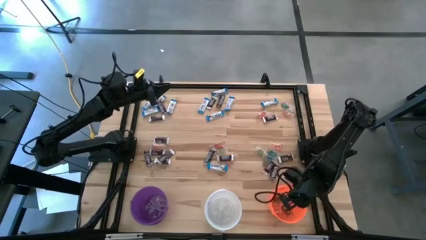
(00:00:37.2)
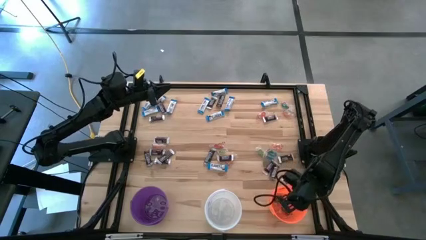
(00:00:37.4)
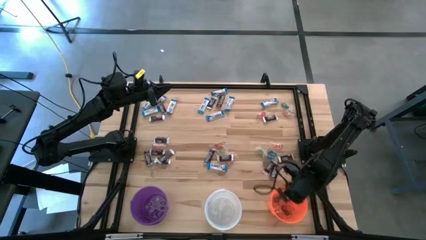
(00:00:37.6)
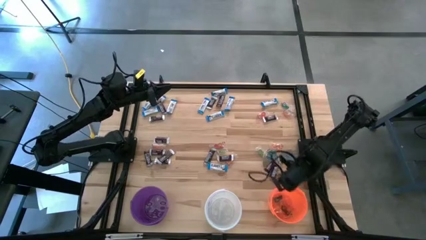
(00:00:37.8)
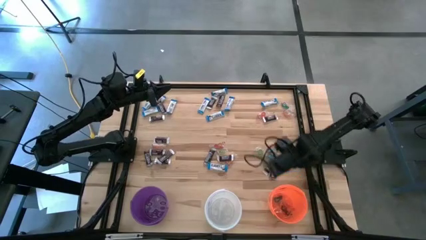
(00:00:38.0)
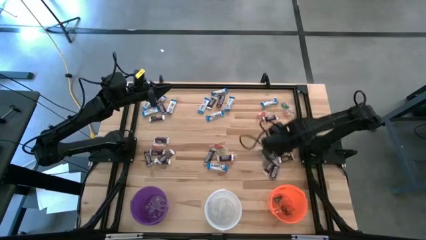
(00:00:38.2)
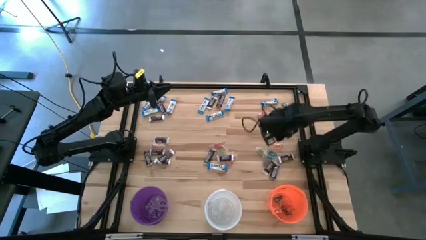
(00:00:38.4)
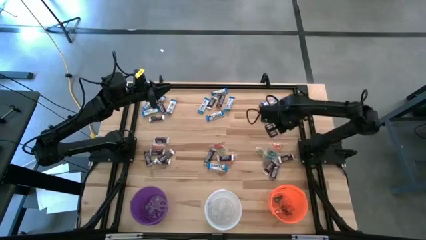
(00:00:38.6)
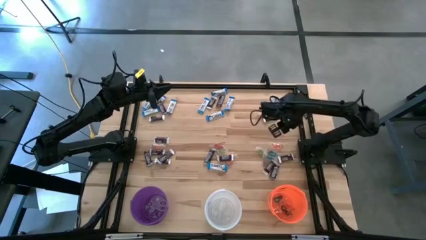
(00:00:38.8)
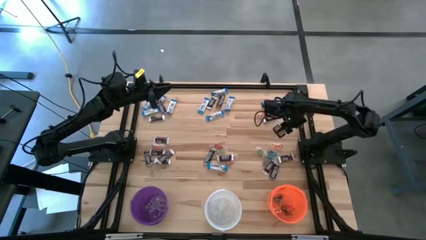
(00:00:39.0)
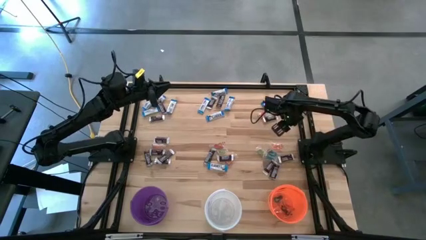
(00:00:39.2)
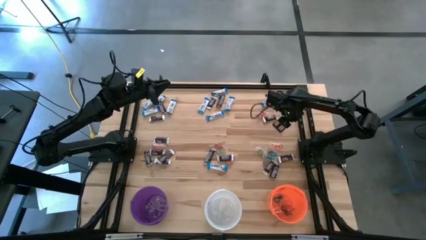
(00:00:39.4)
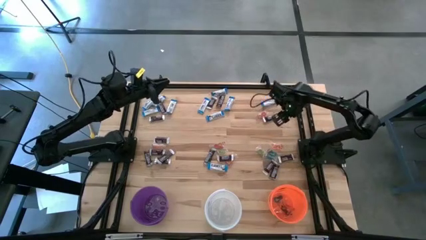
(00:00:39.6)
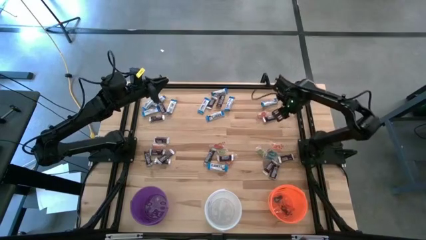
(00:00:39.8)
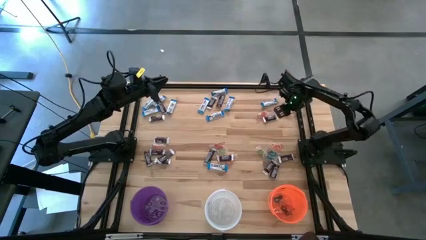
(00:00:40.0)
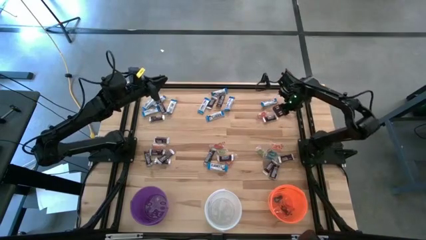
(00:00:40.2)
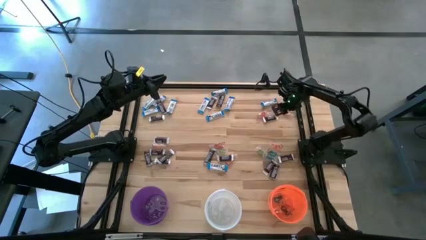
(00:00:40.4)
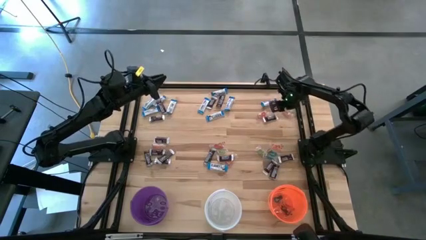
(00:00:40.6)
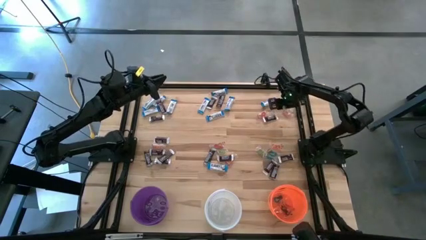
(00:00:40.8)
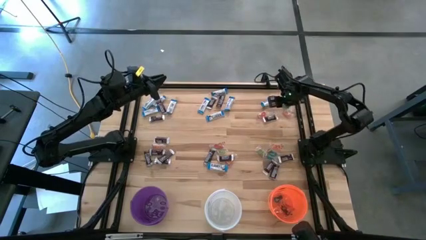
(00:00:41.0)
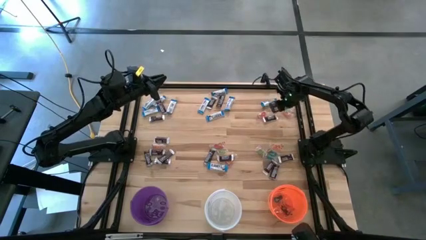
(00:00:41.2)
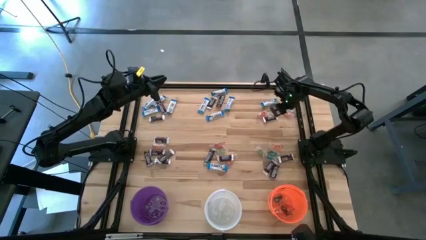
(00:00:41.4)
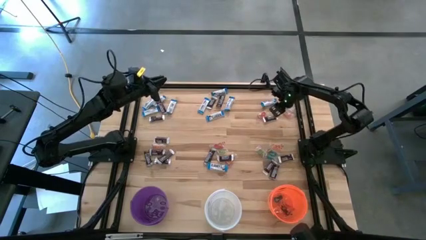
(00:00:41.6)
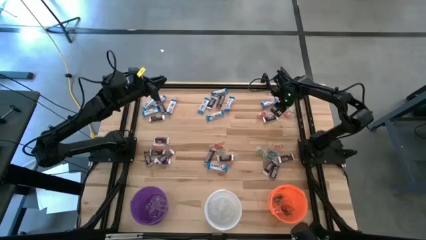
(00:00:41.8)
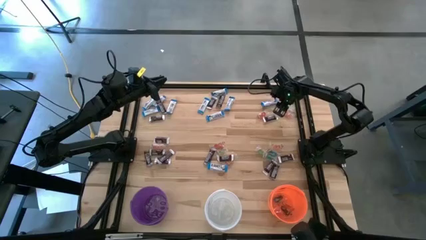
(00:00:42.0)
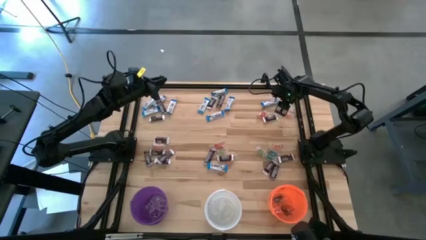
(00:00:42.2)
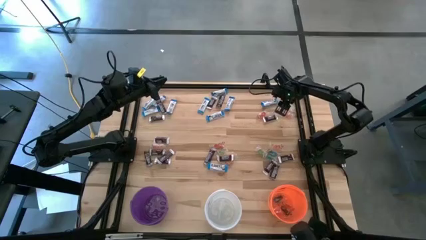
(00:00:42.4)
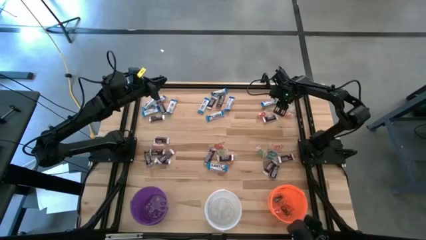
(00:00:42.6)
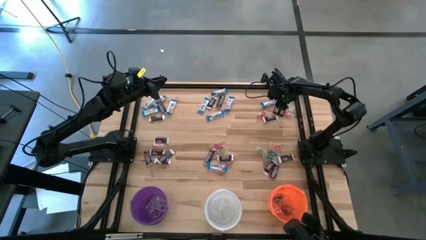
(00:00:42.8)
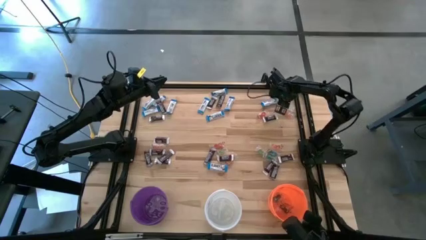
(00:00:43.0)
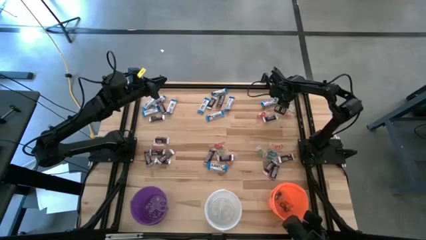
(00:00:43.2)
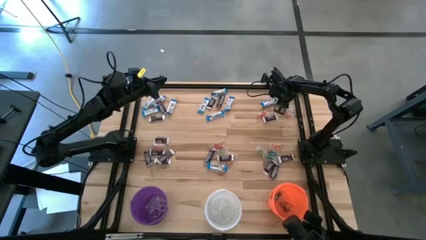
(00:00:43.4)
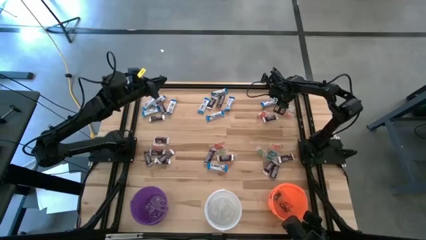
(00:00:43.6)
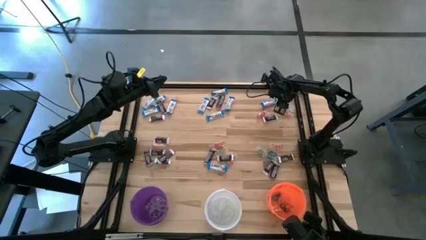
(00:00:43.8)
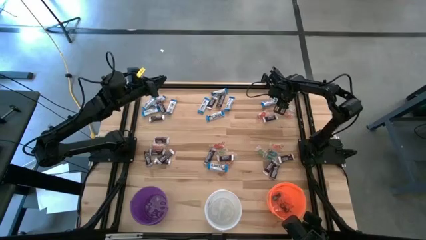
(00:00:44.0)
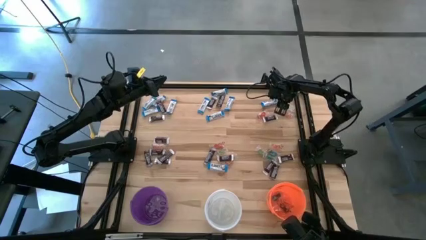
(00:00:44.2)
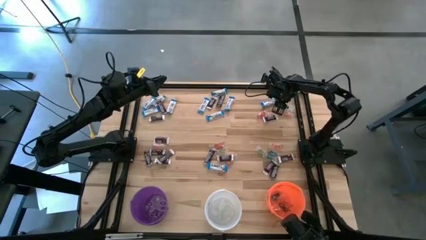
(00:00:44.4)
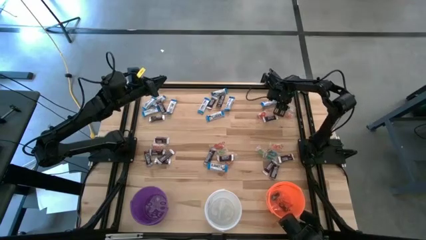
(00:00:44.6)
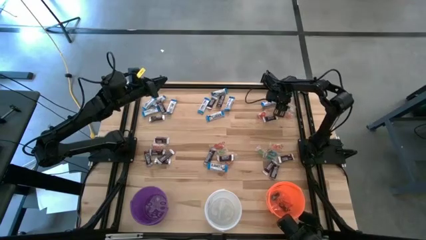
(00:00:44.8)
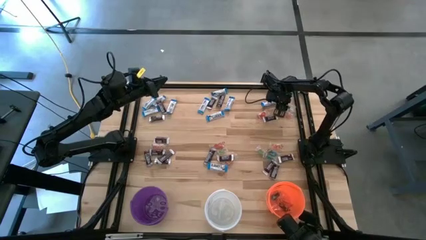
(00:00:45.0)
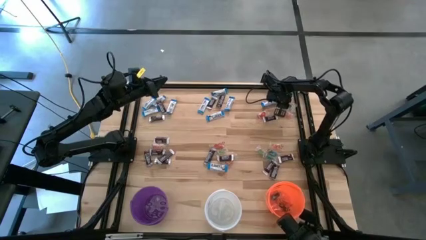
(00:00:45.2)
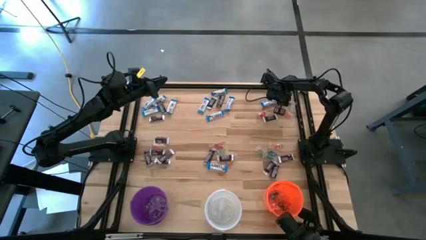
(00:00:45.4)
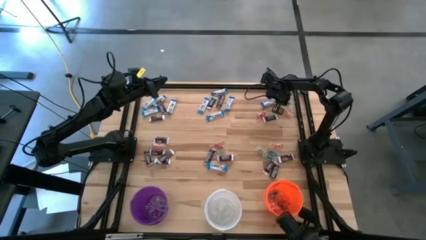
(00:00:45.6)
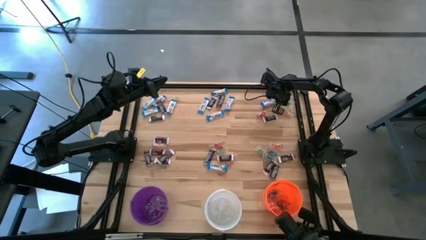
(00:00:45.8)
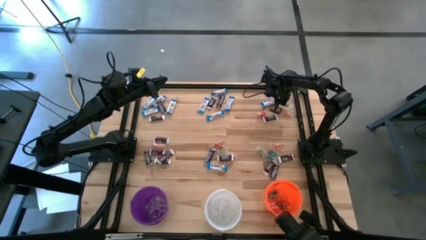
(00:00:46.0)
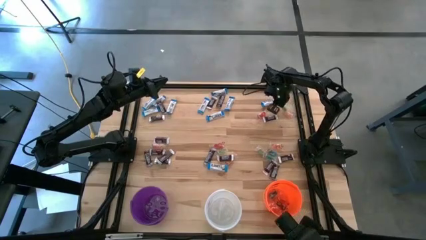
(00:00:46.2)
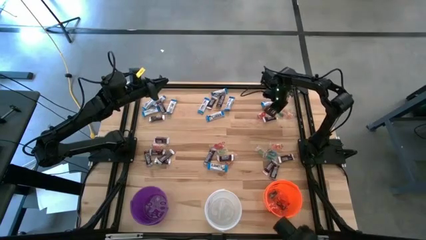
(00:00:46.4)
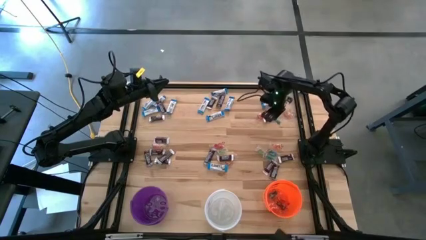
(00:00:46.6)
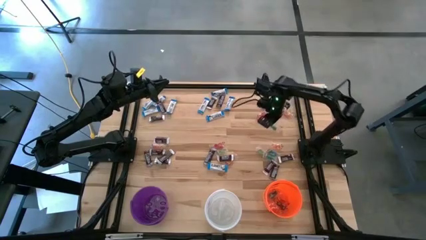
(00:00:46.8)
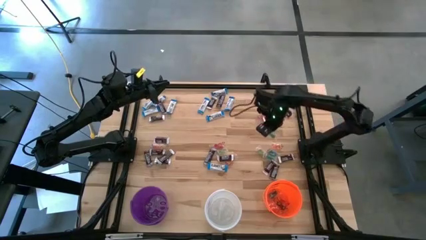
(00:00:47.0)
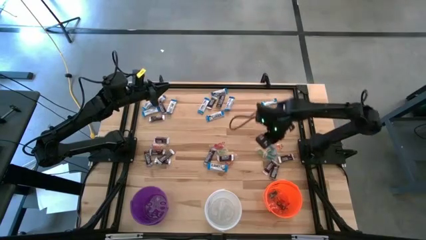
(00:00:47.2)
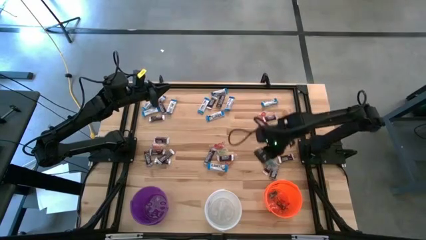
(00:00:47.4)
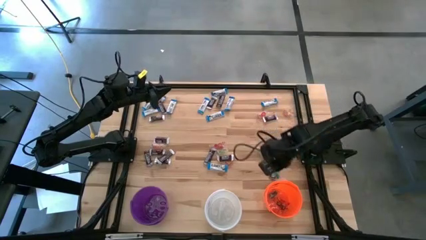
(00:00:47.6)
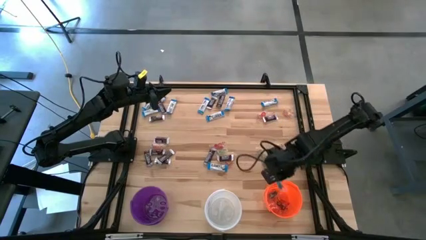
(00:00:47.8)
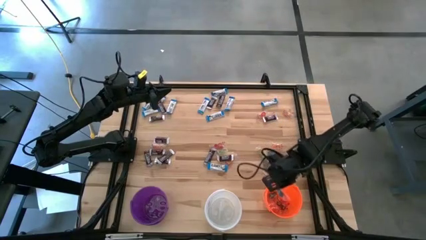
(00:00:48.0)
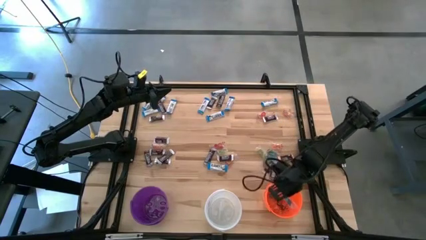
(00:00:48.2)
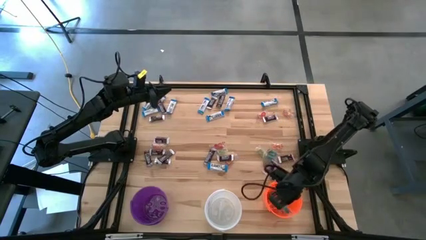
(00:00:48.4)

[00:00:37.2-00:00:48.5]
Task: Sort candy
Put the blue gummy into the orange bucket
